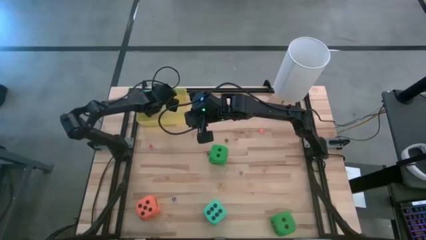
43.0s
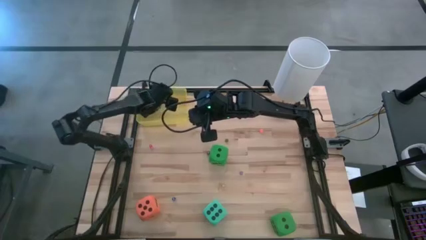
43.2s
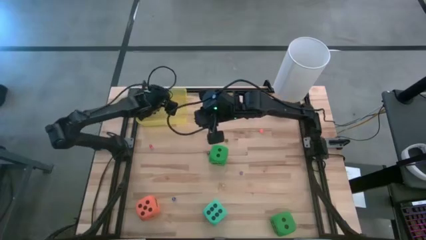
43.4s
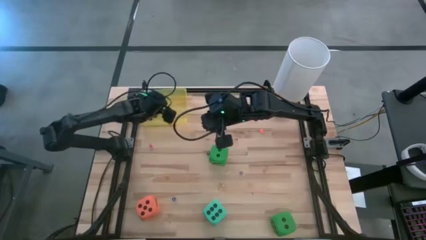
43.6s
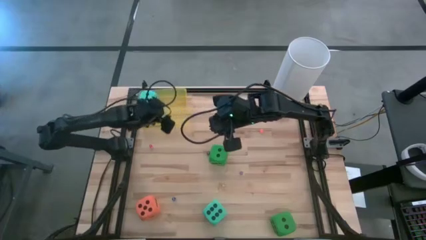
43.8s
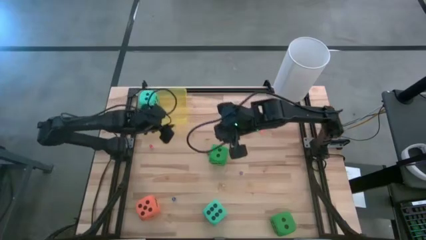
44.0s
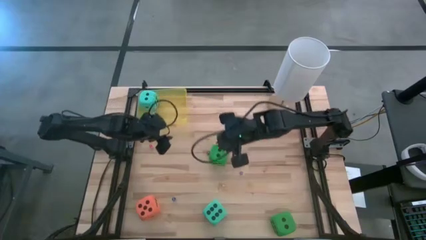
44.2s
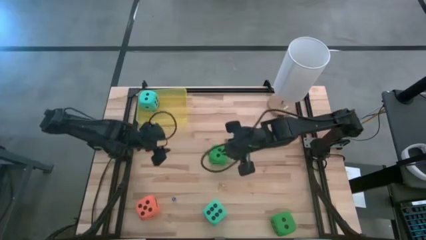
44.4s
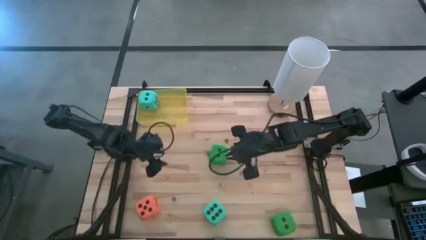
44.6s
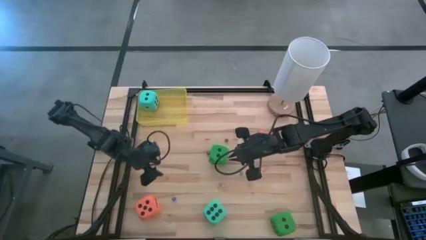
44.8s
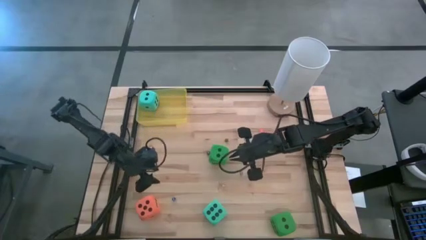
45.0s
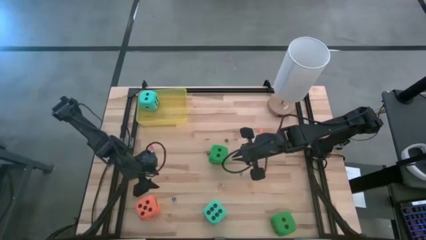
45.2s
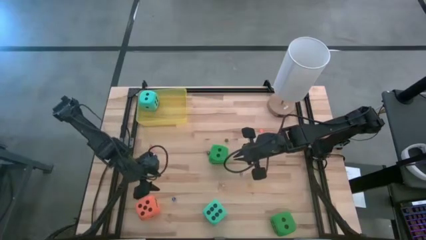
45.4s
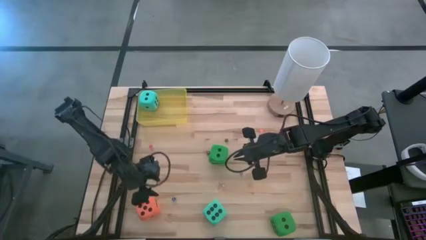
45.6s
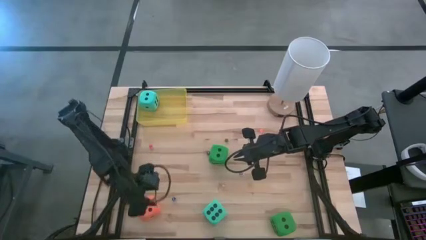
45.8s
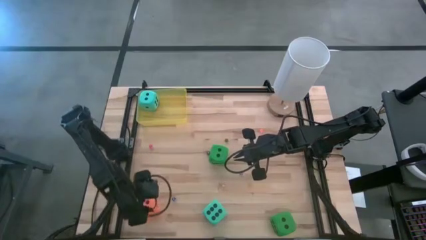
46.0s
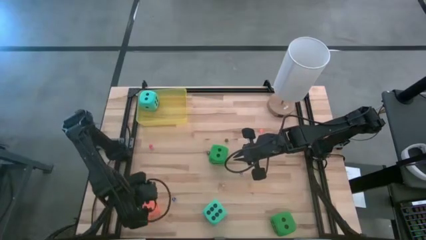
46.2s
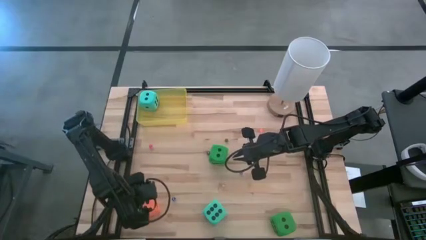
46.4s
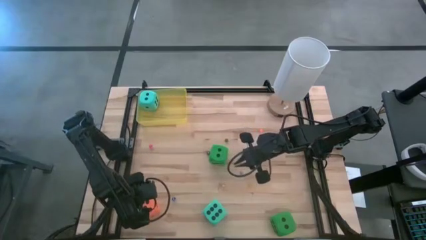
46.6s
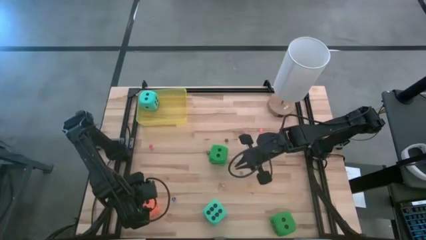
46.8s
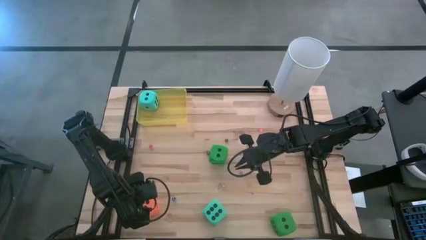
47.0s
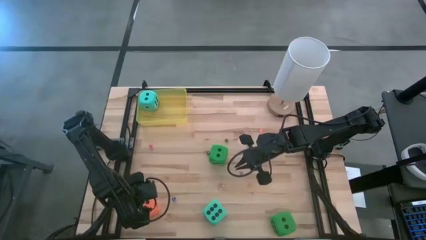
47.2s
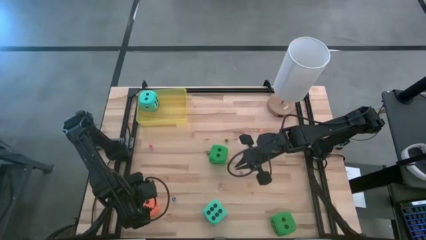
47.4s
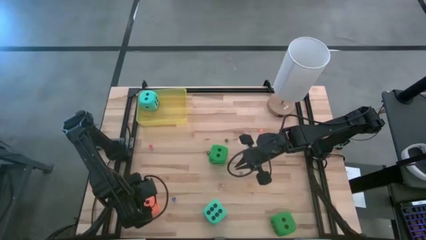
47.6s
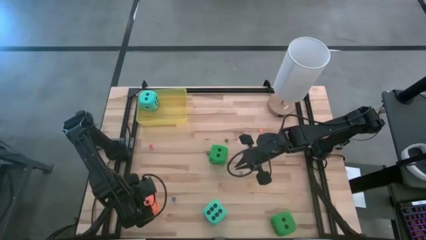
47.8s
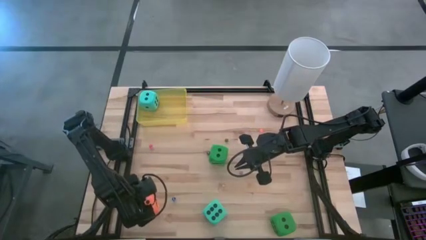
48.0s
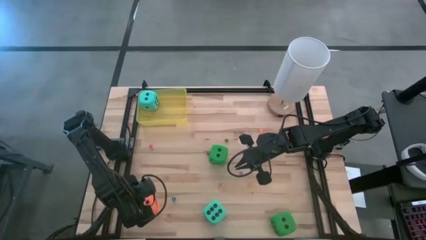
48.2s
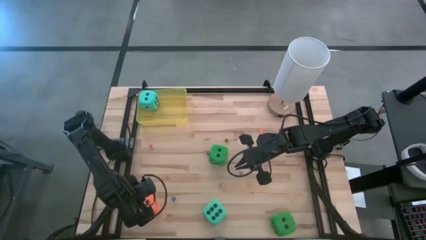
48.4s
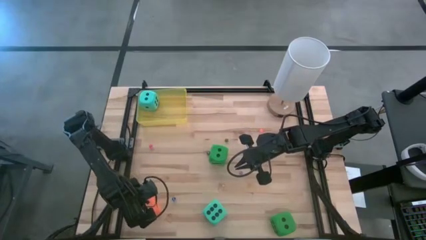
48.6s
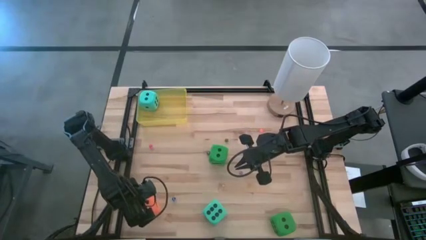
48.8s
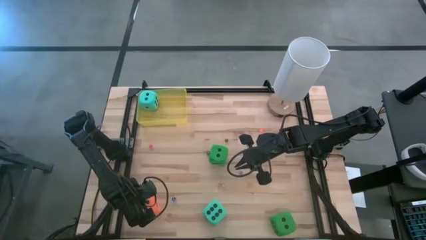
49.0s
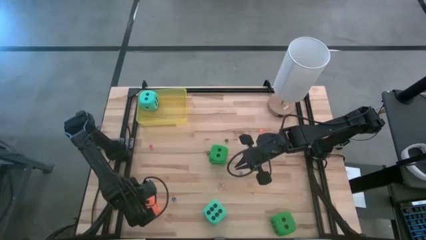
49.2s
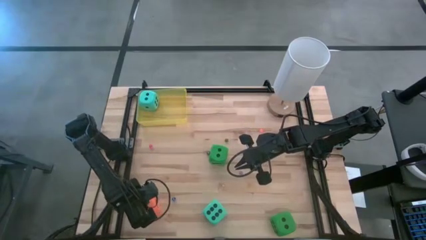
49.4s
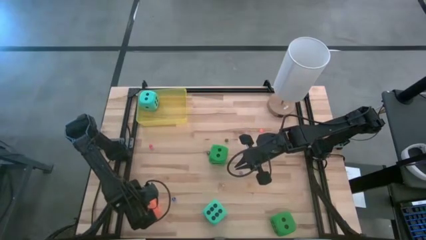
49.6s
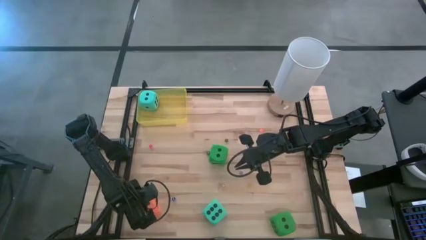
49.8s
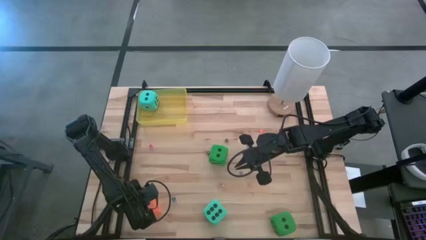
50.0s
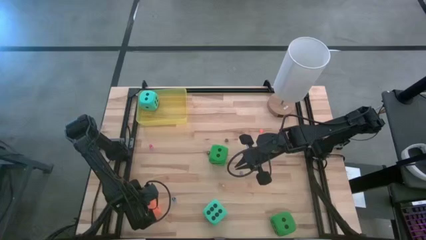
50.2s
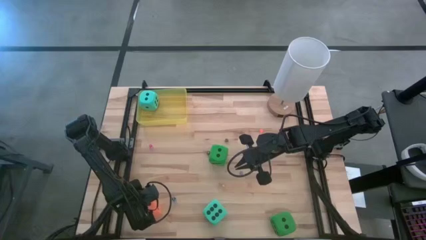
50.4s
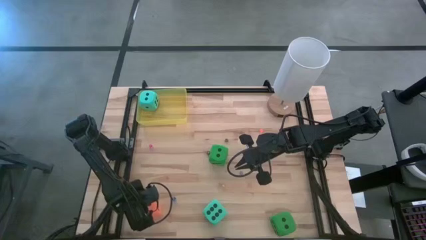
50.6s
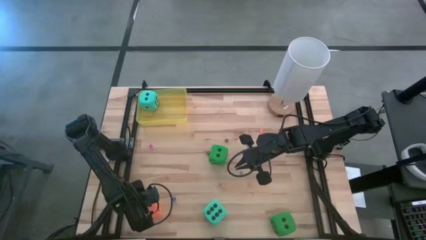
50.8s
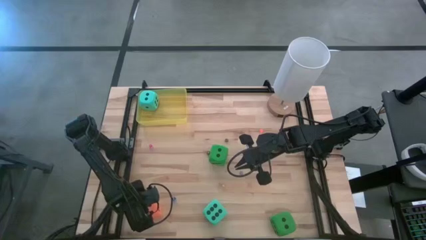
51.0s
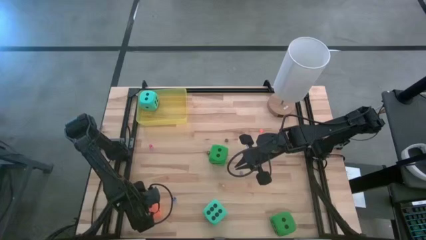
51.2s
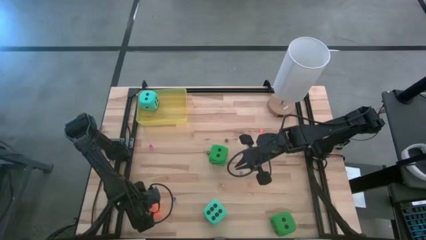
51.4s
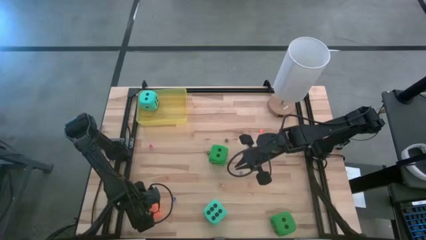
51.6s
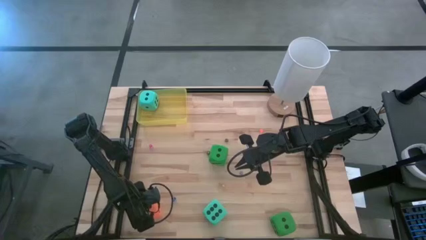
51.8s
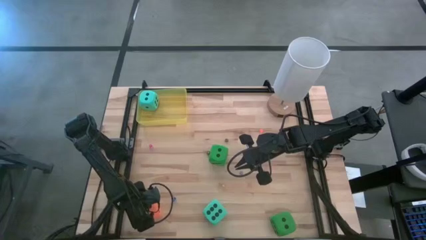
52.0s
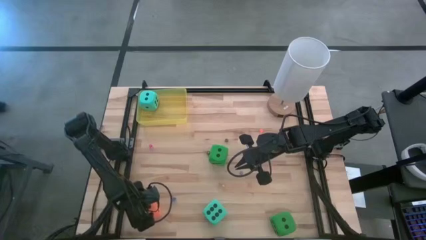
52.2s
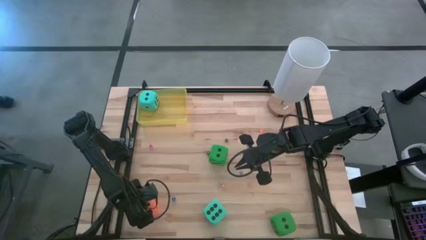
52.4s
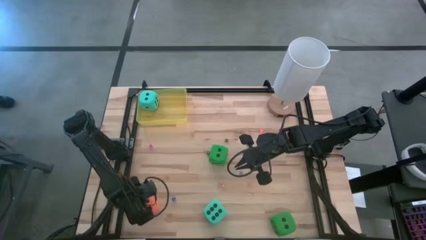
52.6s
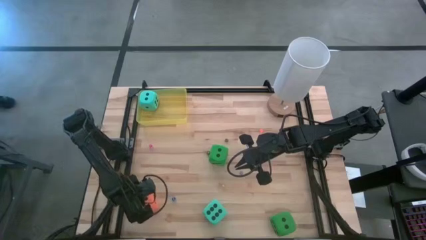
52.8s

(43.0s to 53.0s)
Task: Pick & Place Dice
Put the orange large die into the yellow container

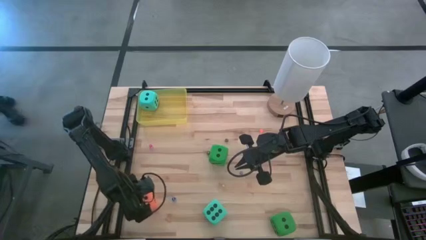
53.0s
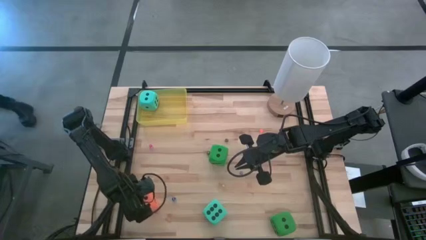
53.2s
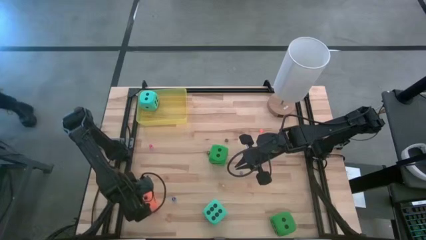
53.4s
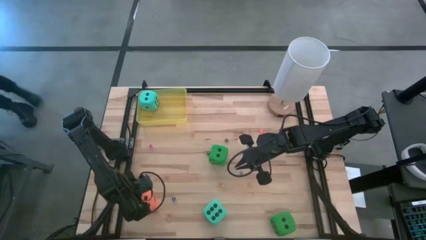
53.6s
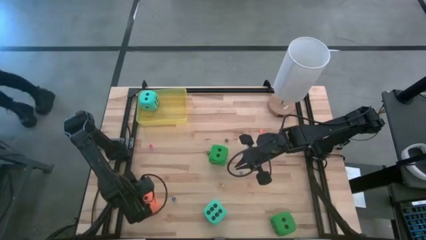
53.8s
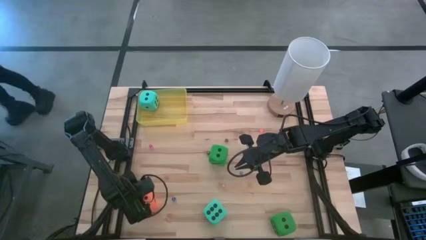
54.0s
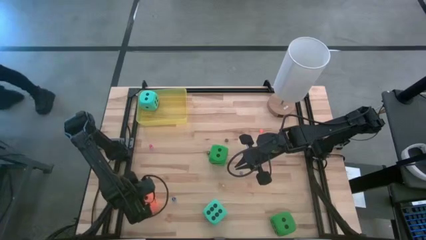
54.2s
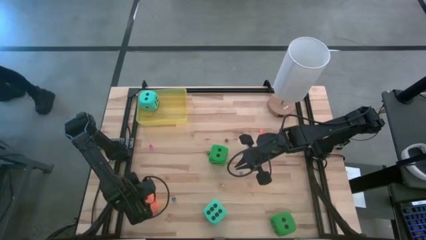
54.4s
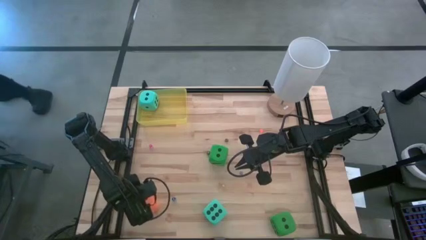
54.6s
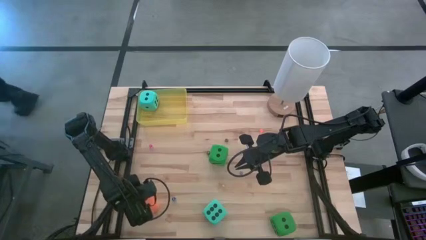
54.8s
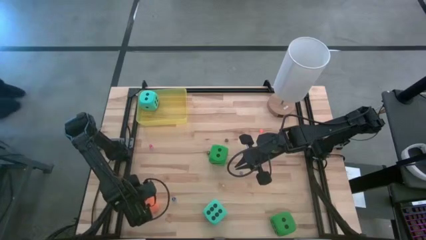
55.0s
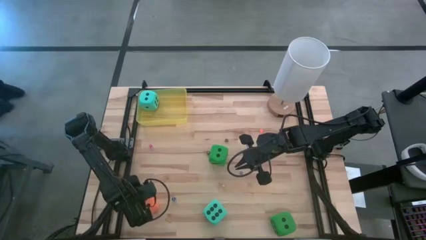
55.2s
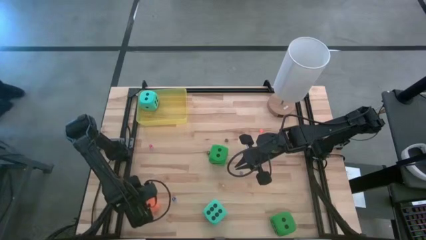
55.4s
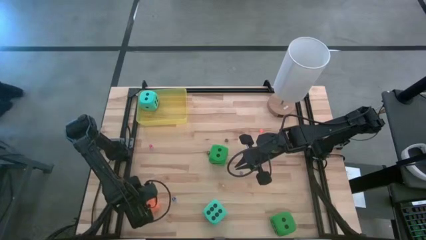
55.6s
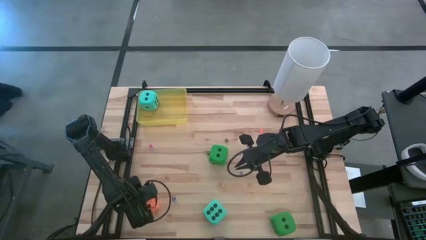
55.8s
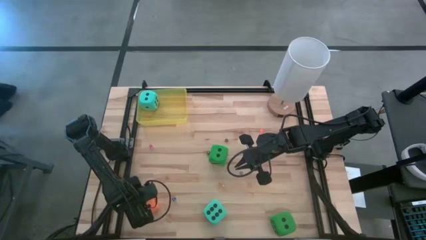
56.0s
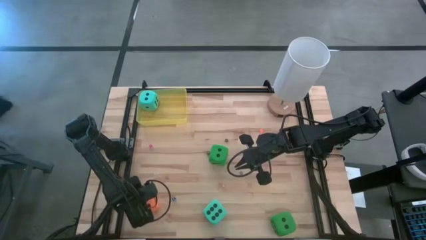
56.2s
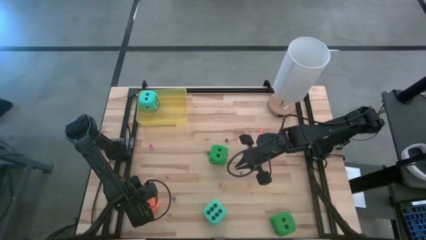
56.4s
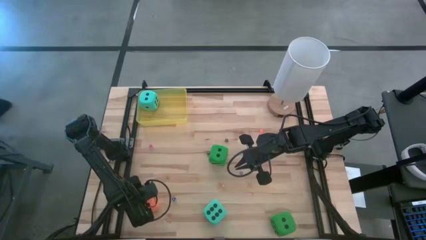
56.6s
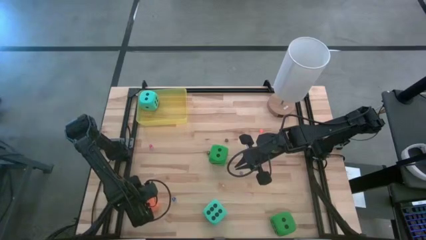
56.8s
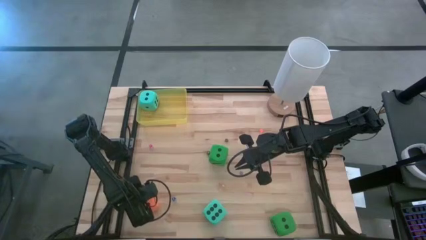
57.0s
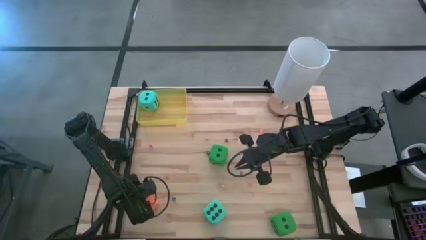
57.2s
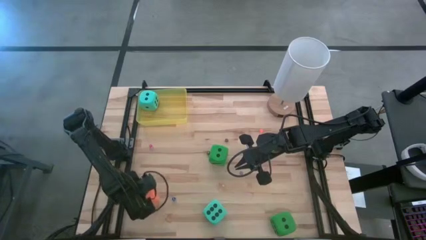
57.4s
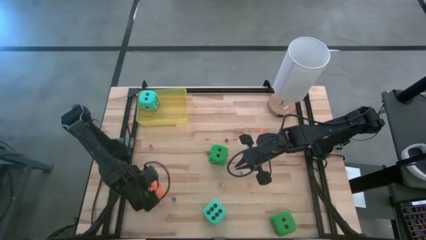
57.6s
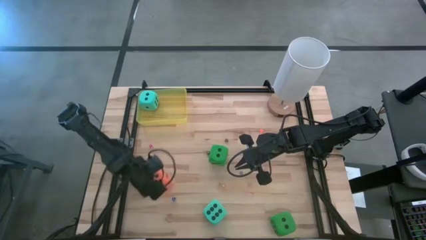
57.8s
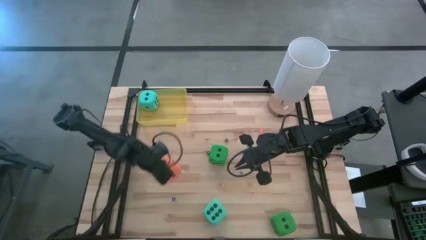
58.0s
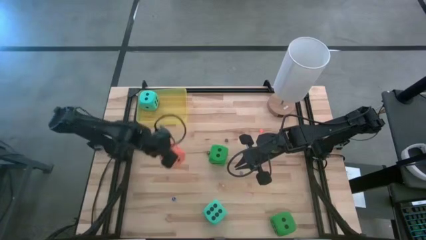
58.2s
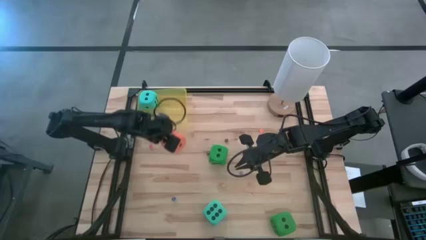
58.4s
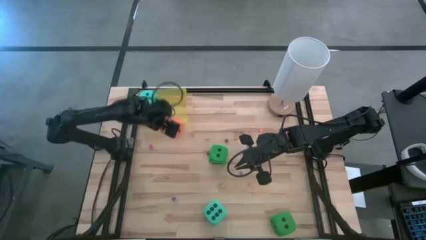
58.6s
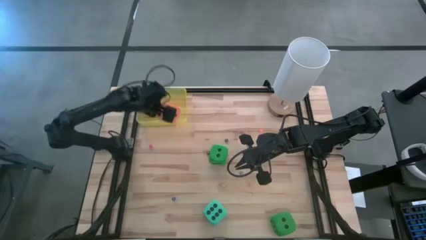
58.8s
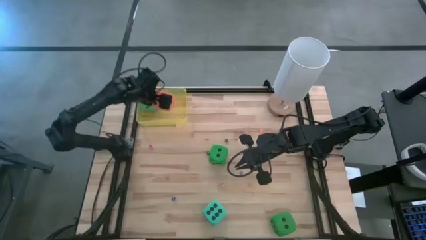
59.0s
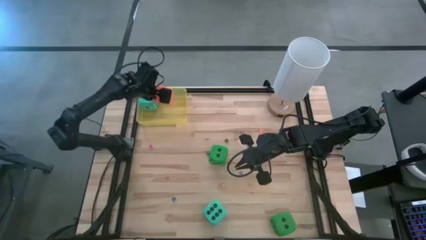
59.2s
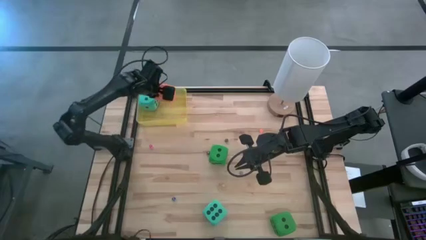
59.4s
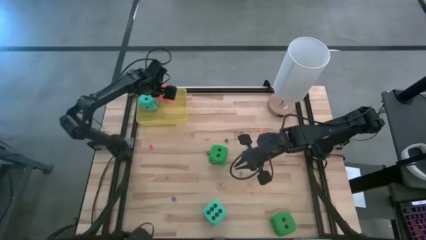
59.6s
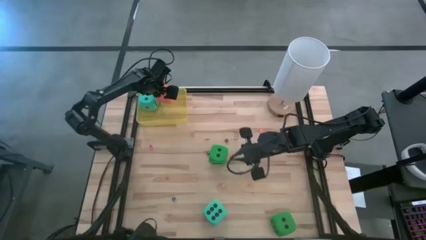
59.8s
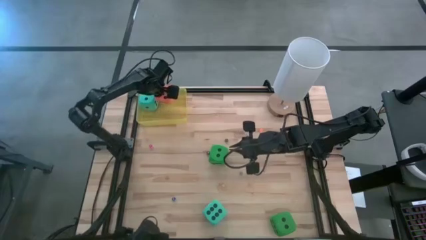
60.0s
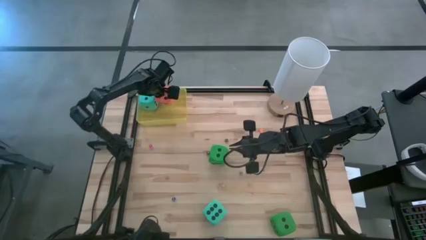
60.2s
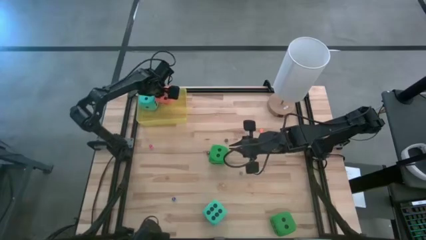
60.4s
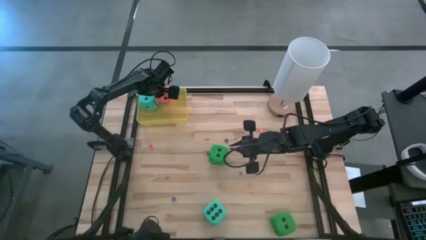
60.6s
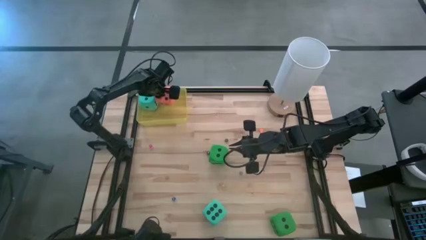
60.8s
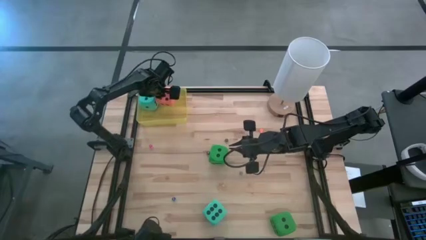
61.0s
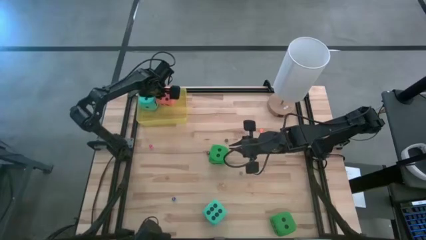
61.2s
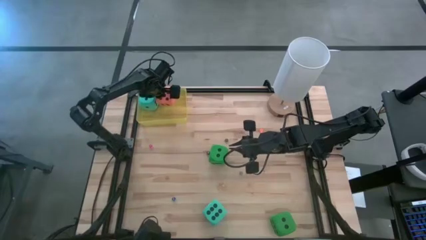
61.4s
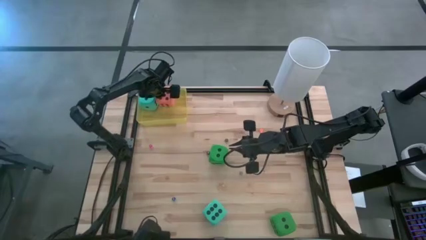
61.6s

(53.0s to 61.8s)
Put the orange large die into the yellow container
